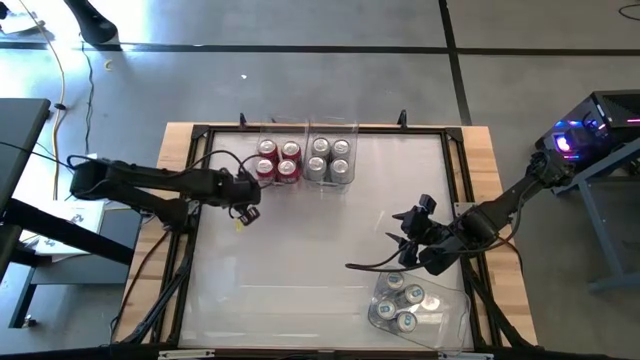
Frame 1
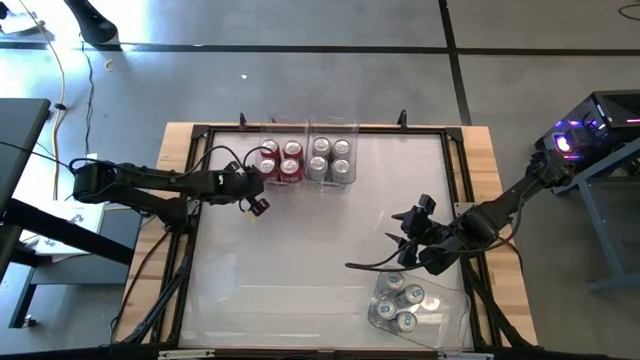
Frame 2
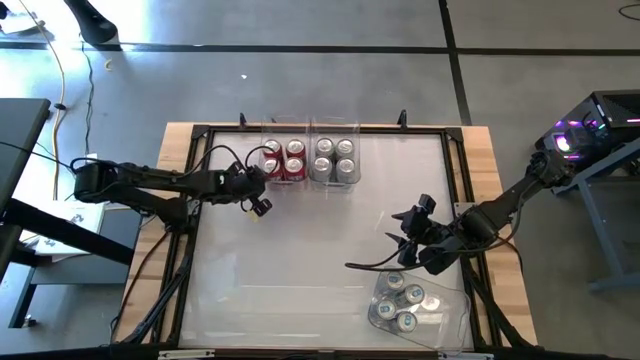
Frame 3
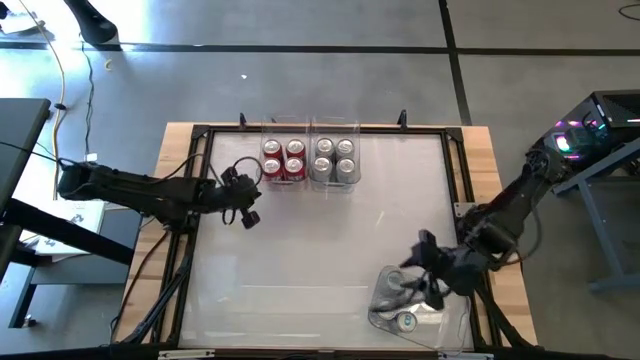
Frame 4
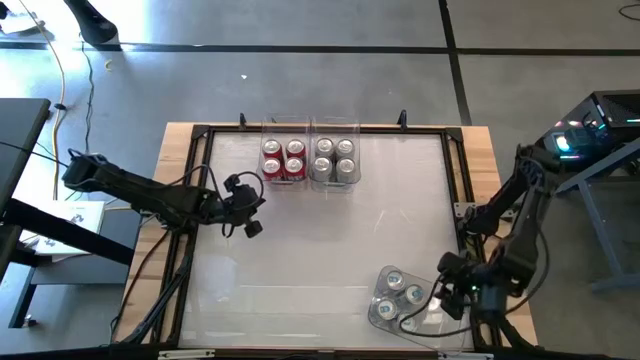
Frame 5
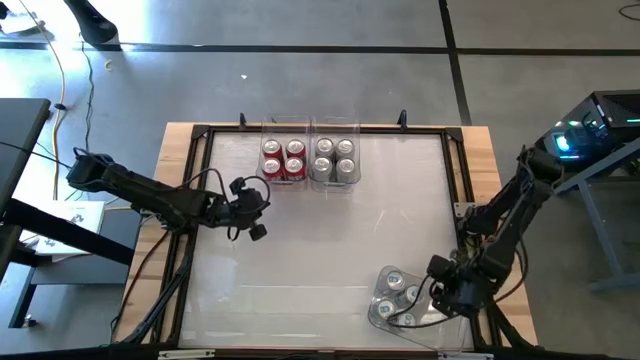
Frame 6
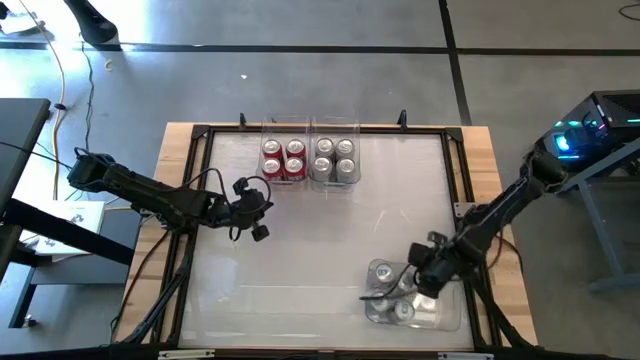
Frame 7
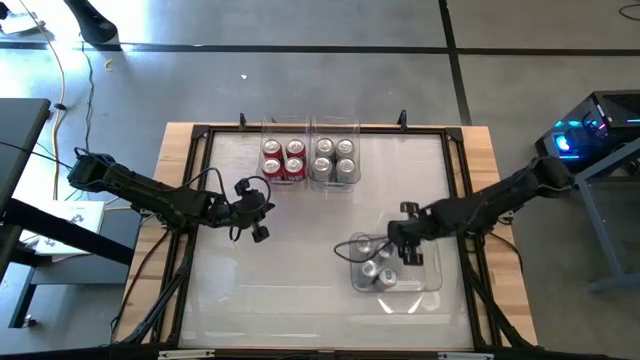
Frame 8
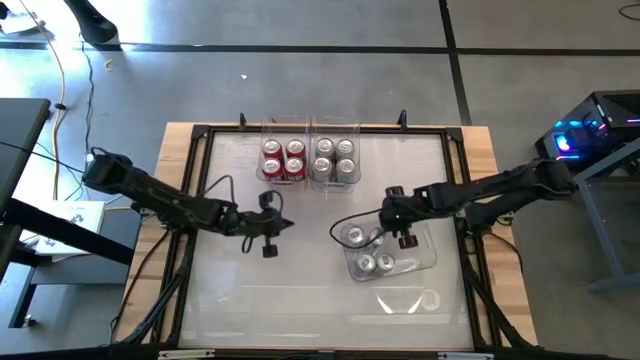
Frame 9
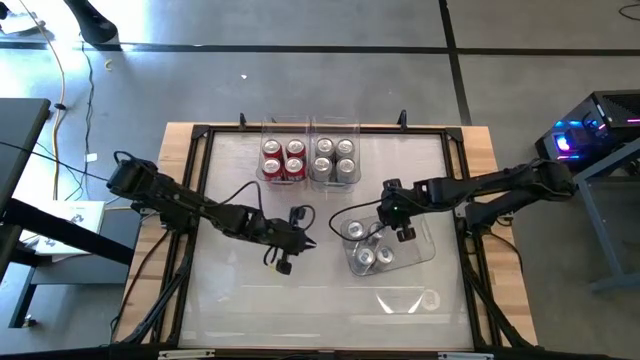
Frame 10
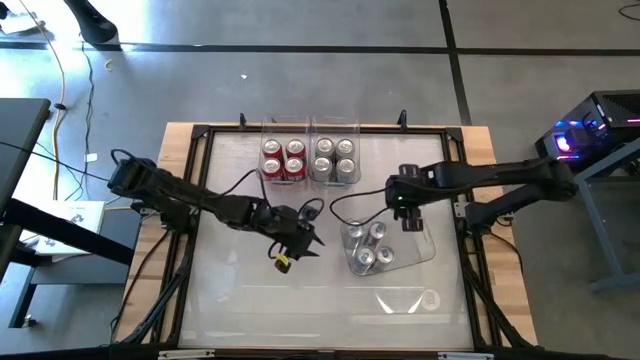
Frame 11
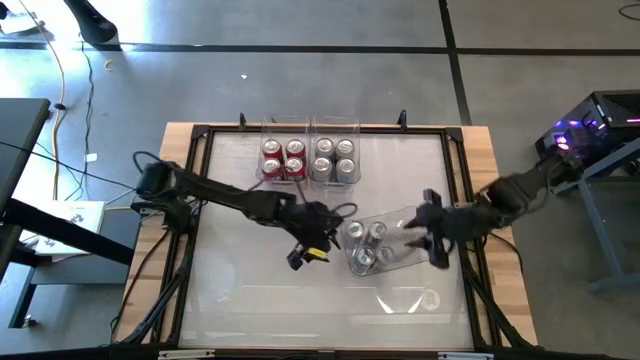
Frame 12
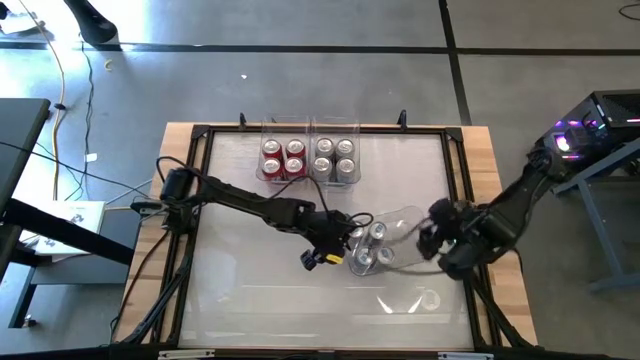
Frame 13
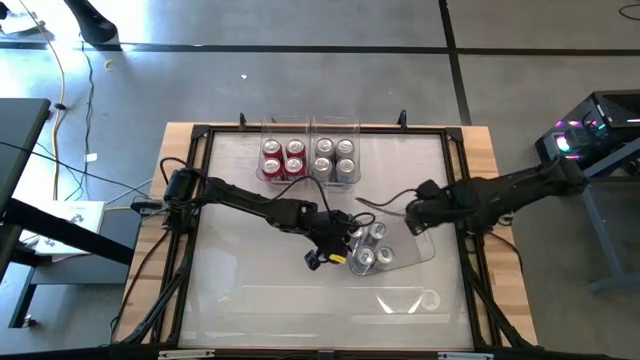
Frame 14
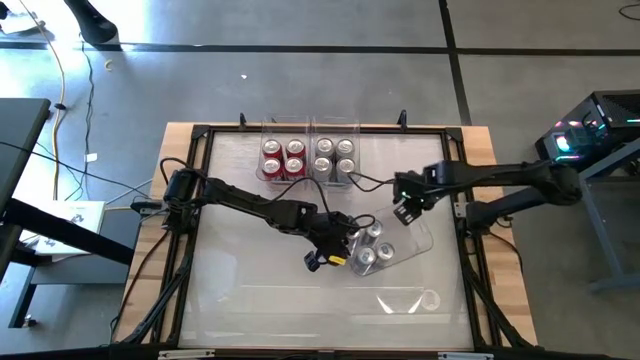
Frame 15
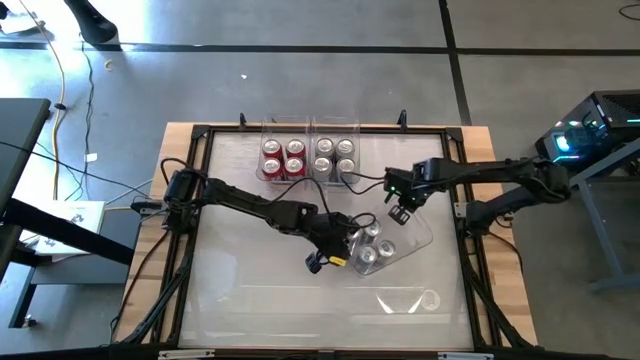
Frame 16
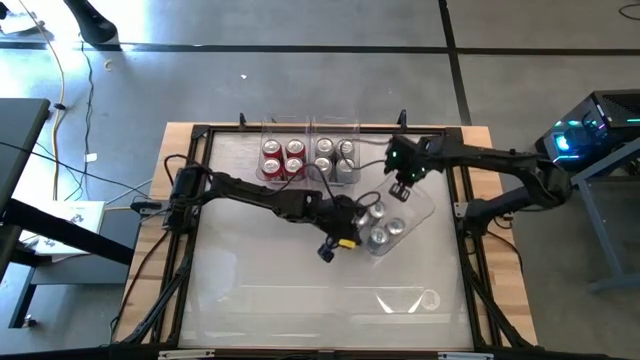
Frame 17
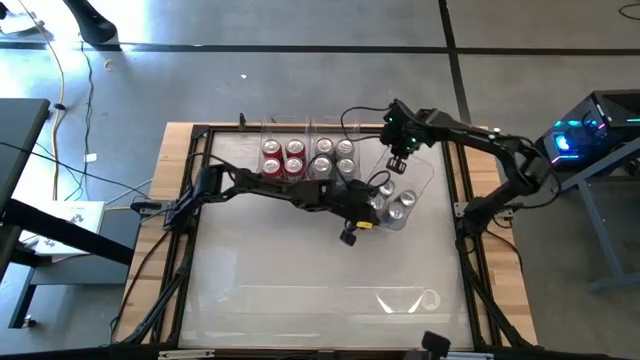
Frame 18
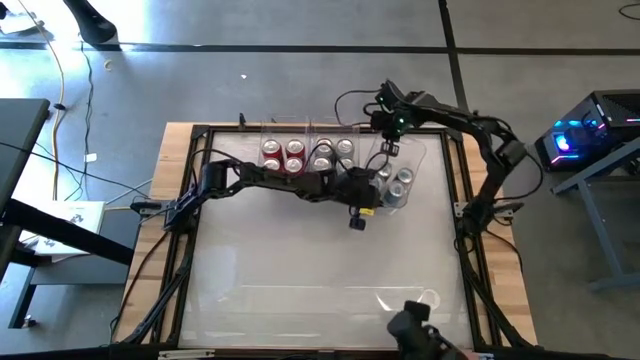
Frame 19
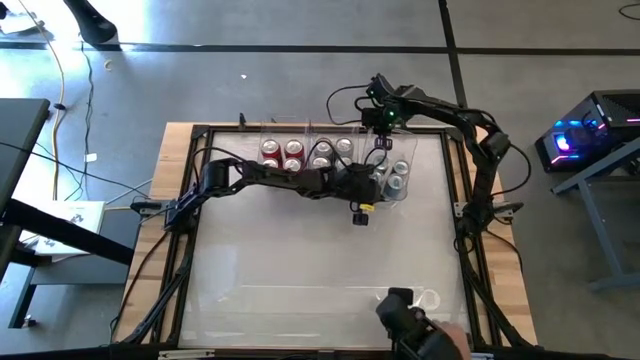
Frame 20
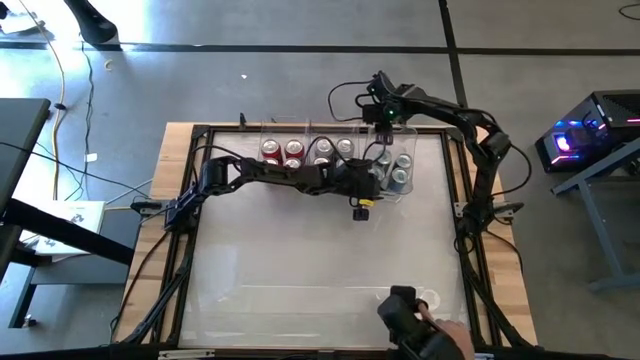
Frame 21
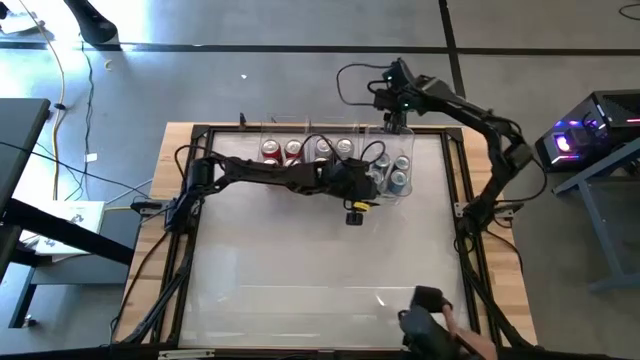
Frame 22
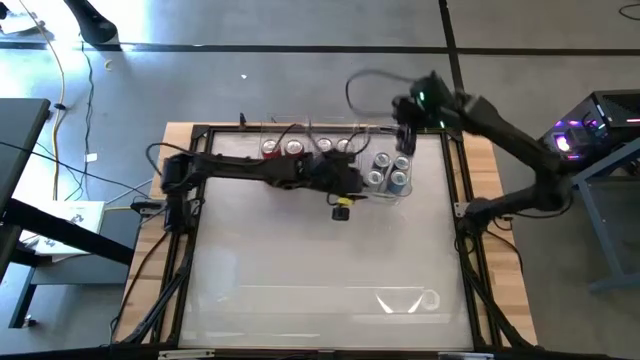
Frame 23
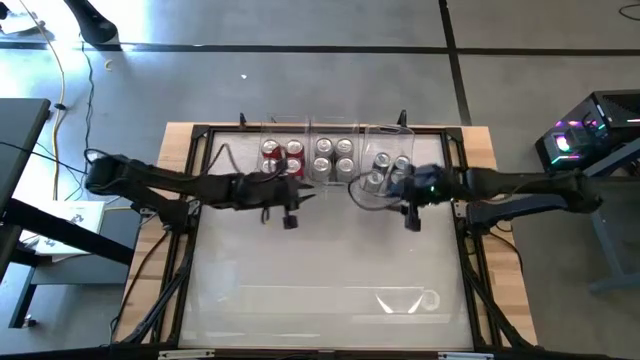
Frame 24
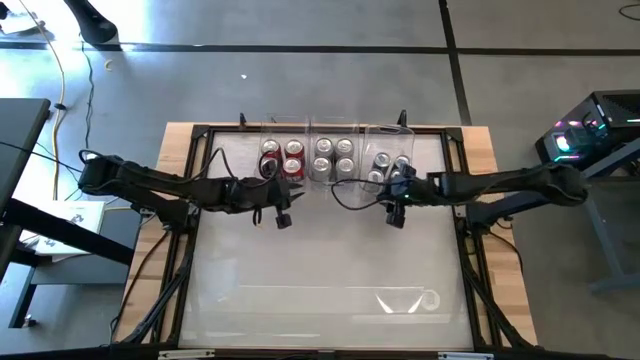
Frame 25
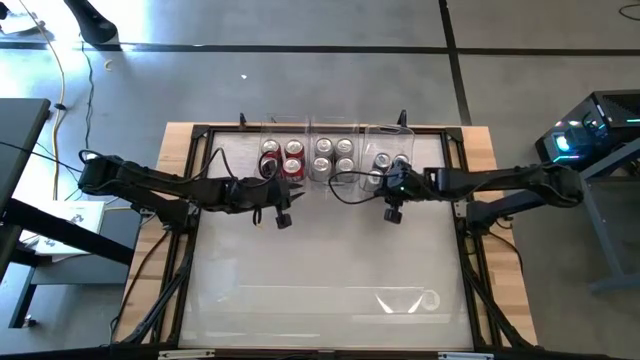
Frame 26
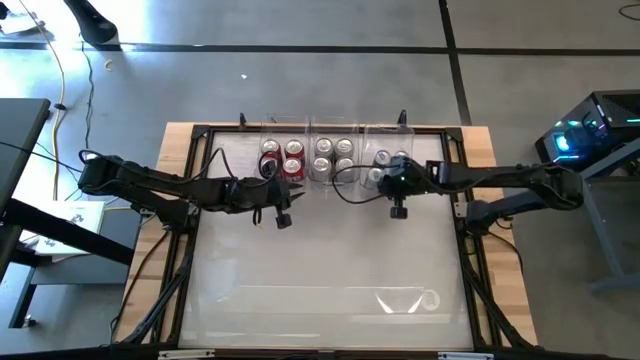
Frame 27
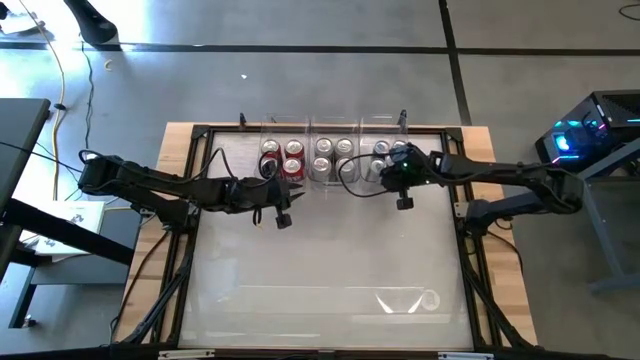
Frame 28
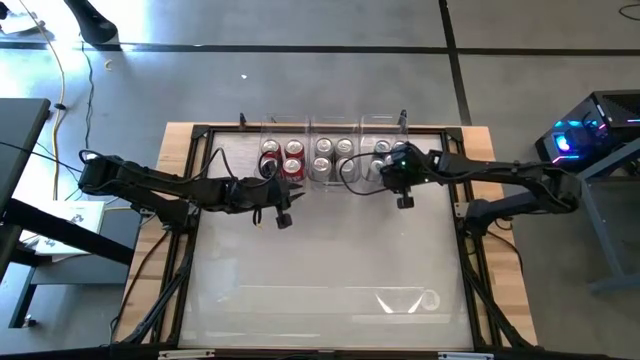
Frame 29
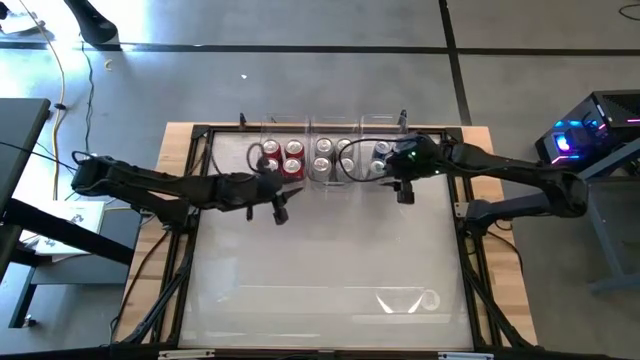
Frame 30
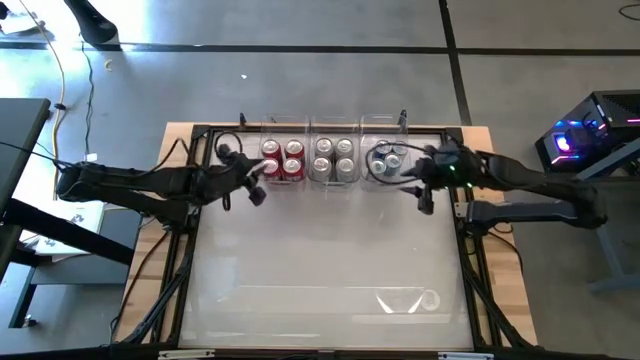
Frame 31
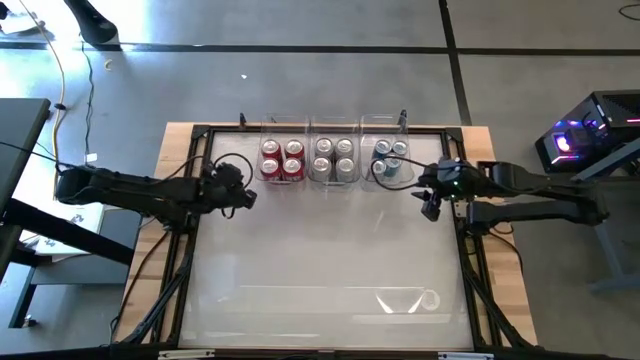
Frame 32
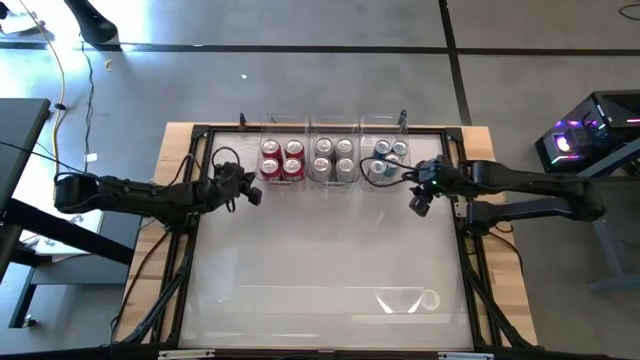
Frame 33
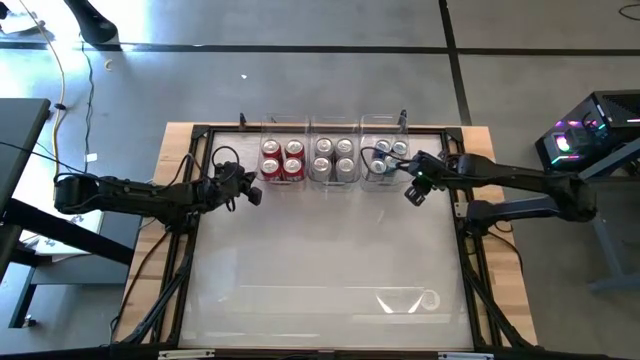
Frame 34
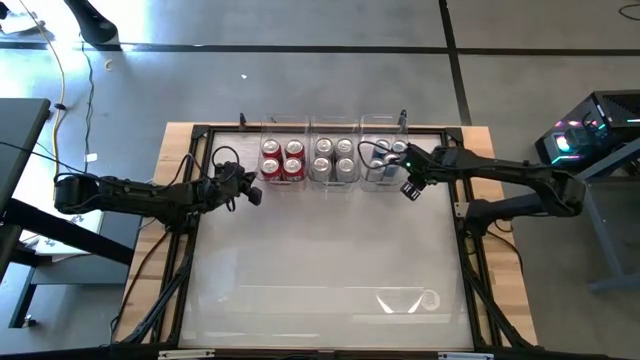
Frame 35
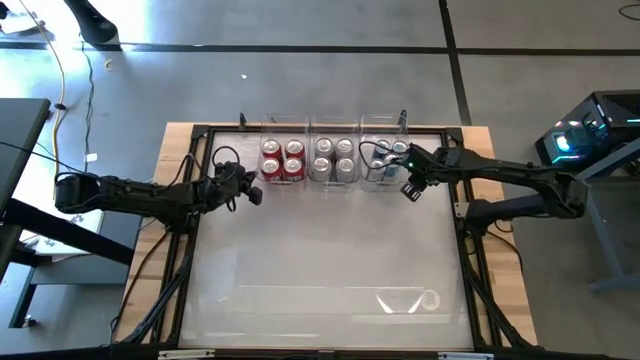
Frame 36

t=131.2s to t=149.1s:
Task: Sort soda cans
Move the bottom transparent bin to the top middle of the table
